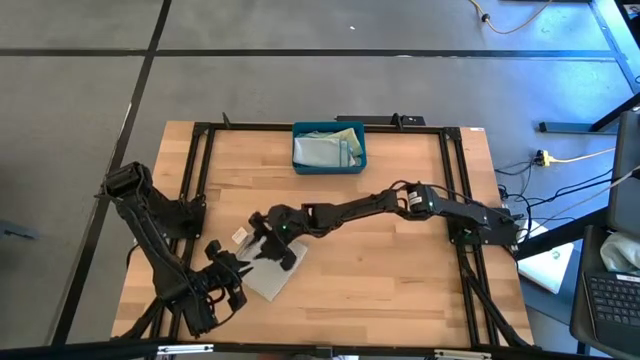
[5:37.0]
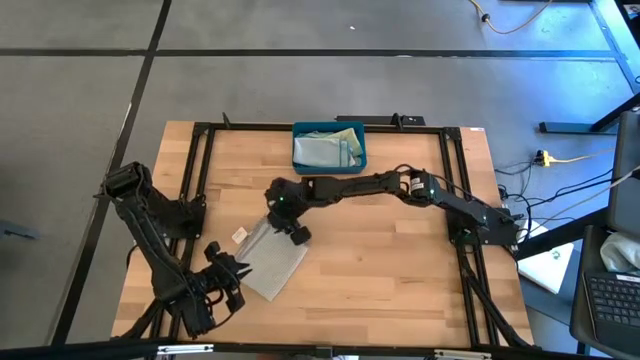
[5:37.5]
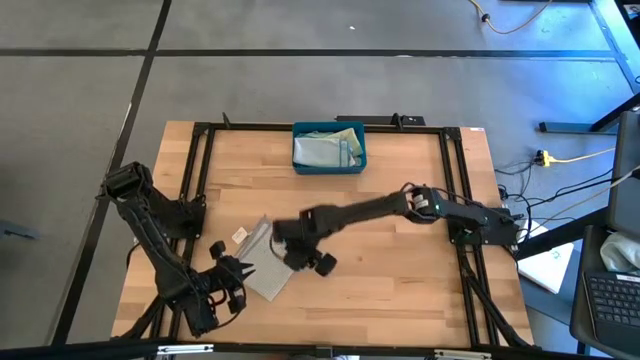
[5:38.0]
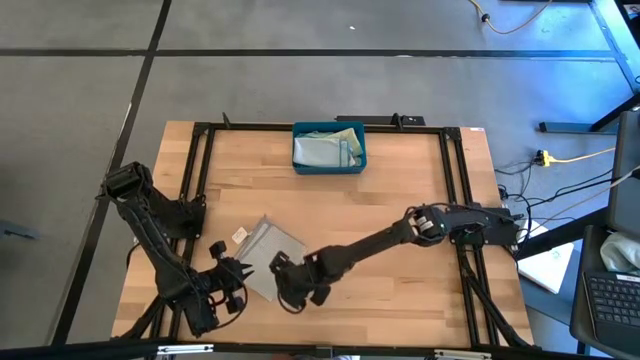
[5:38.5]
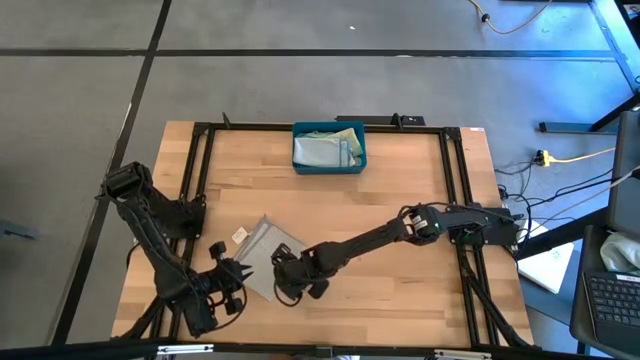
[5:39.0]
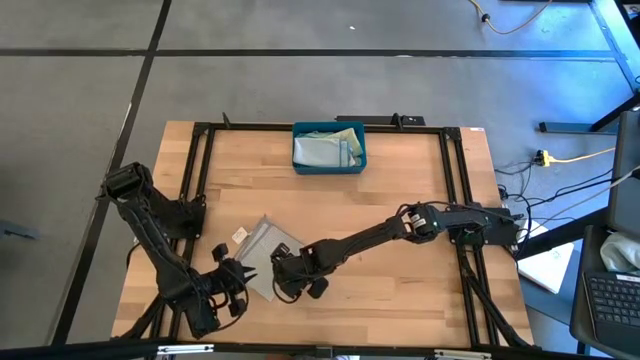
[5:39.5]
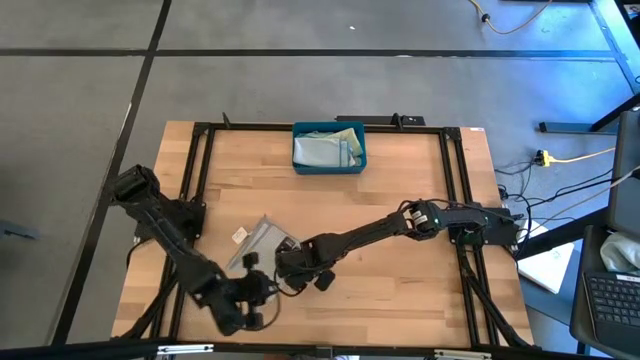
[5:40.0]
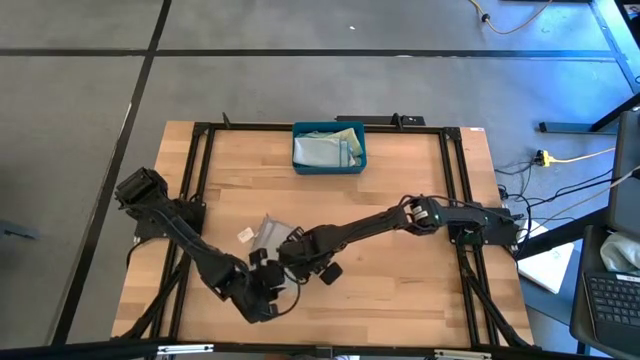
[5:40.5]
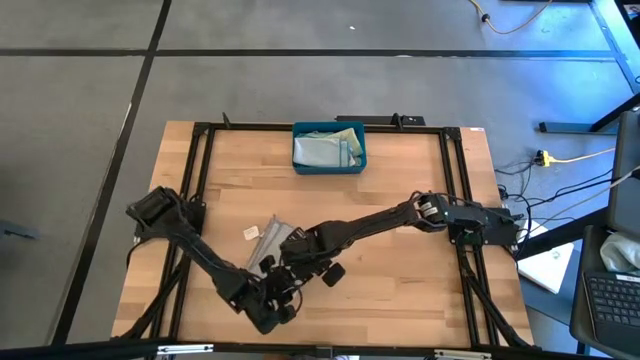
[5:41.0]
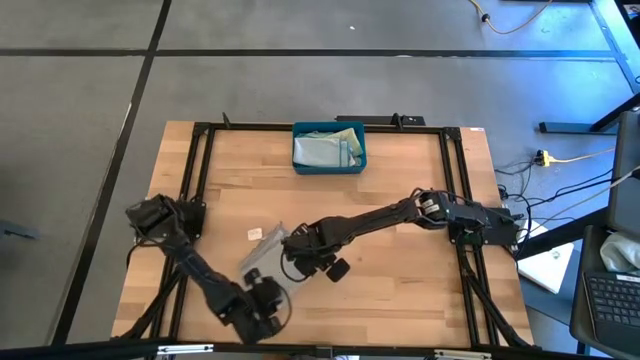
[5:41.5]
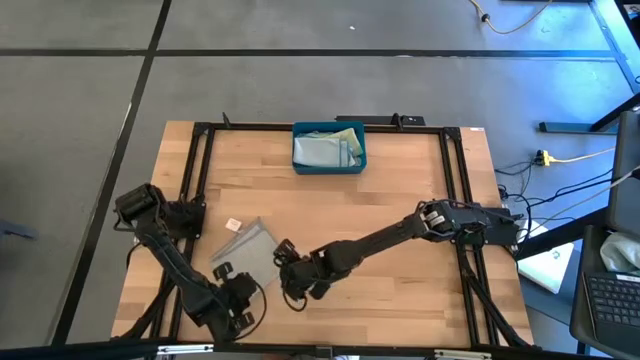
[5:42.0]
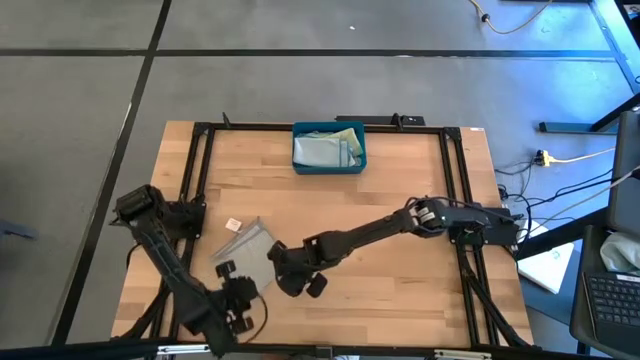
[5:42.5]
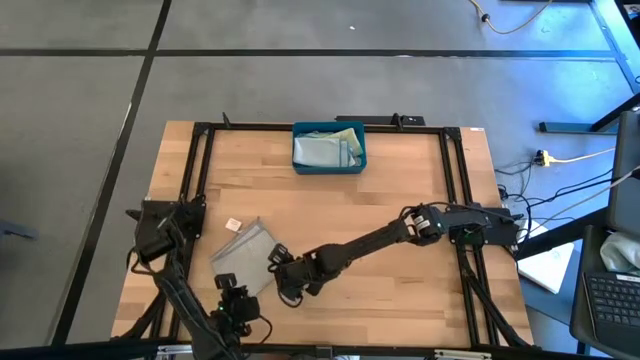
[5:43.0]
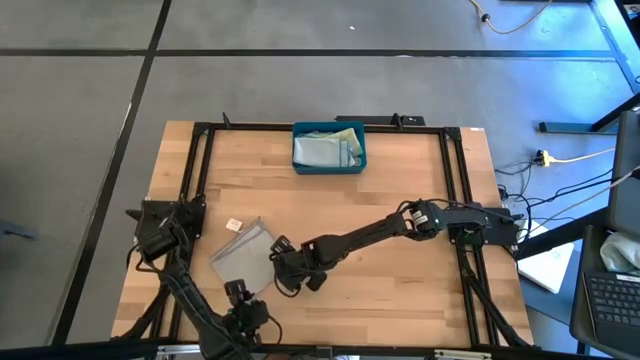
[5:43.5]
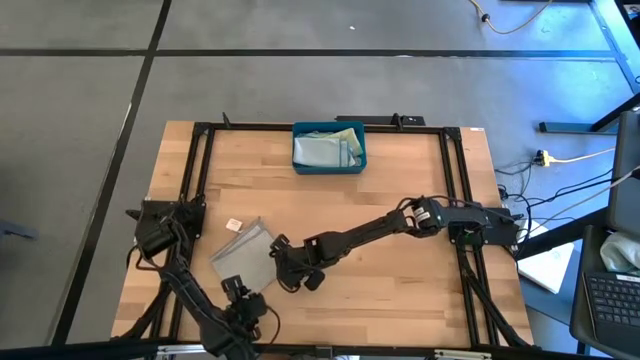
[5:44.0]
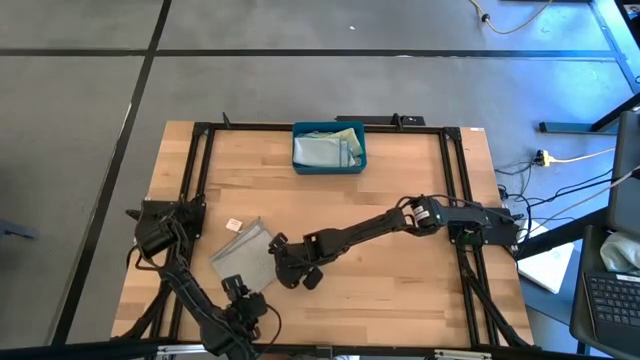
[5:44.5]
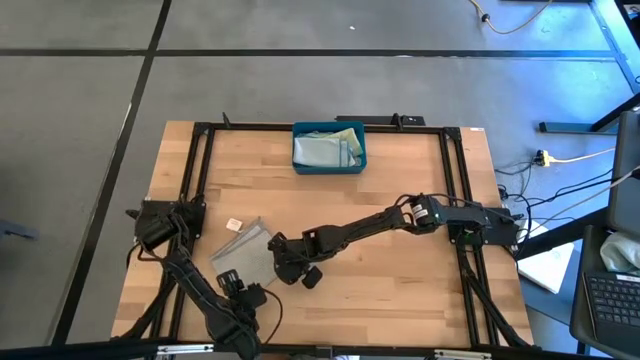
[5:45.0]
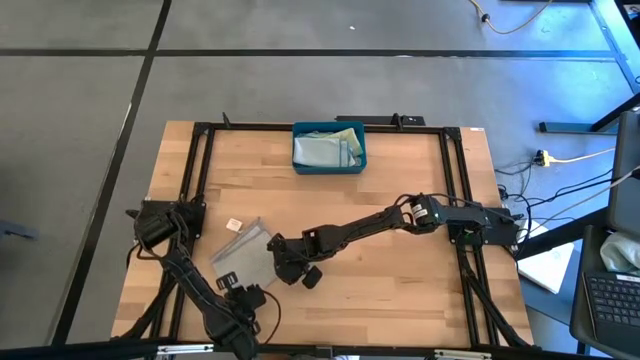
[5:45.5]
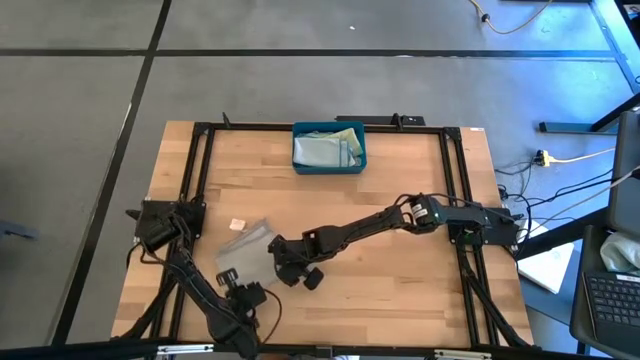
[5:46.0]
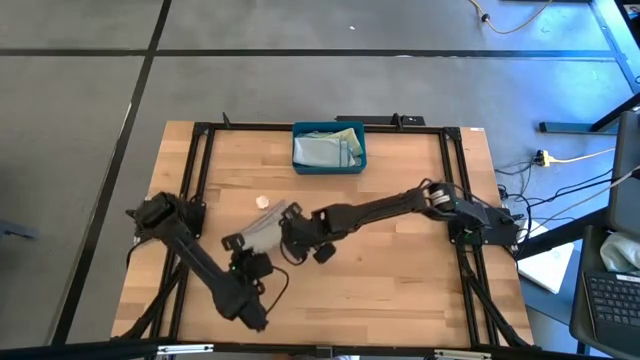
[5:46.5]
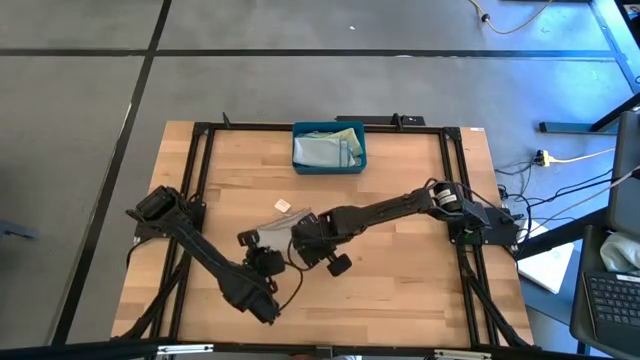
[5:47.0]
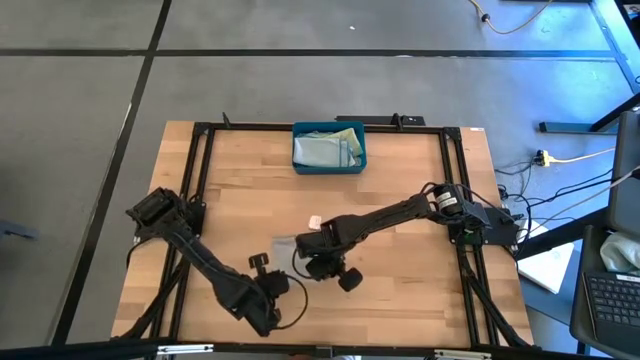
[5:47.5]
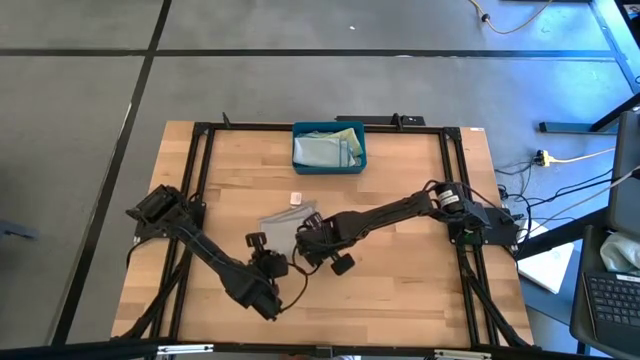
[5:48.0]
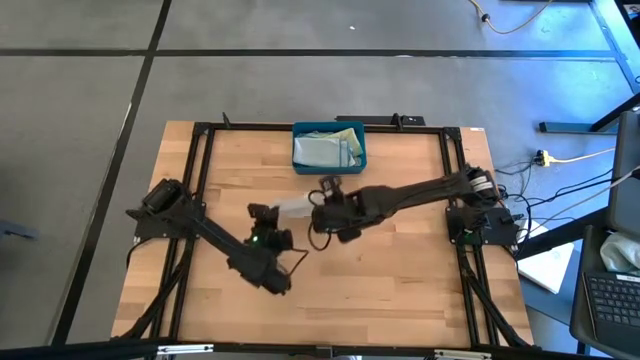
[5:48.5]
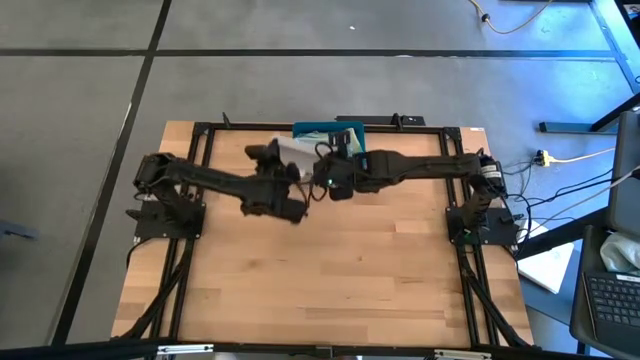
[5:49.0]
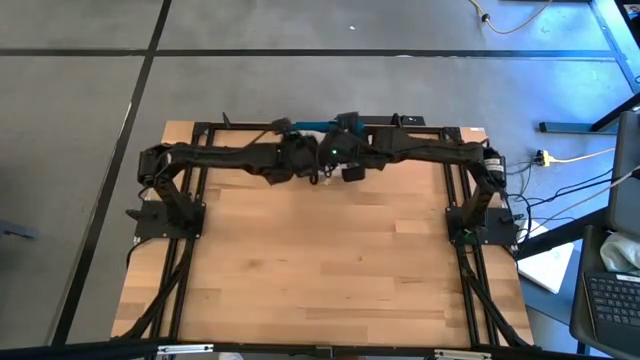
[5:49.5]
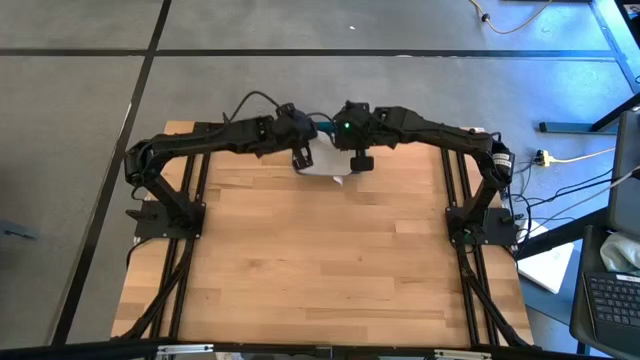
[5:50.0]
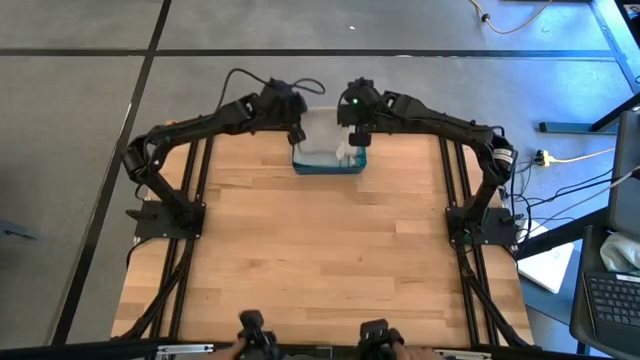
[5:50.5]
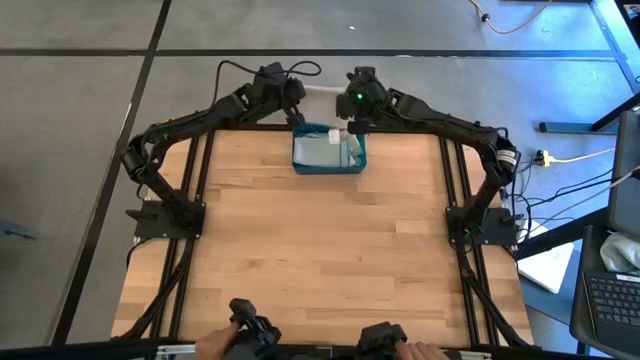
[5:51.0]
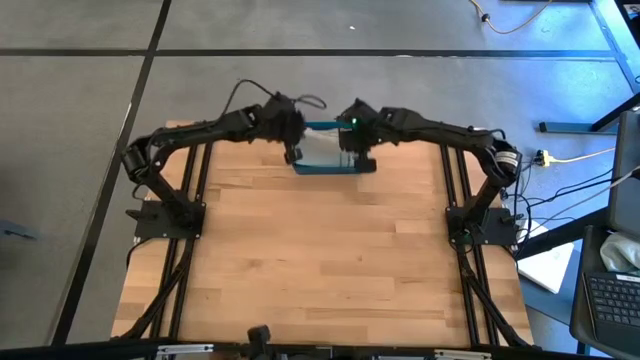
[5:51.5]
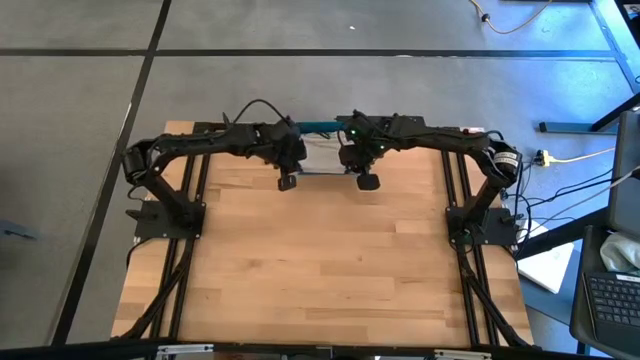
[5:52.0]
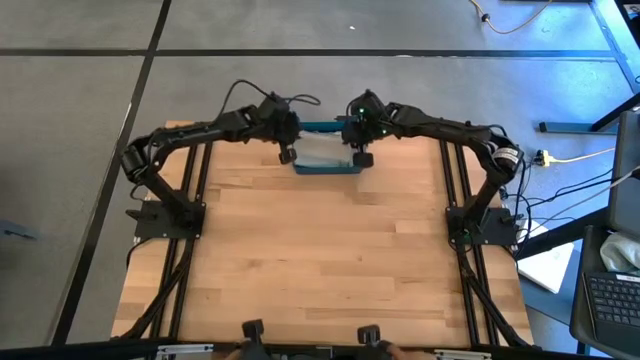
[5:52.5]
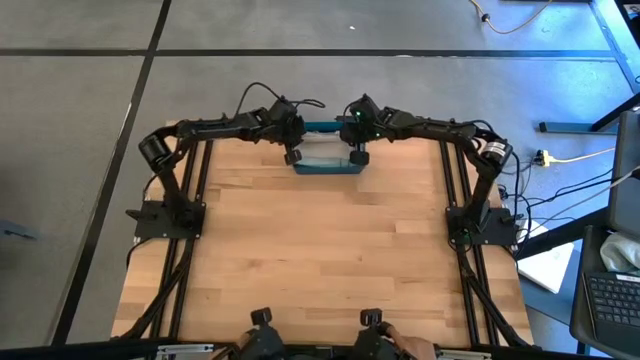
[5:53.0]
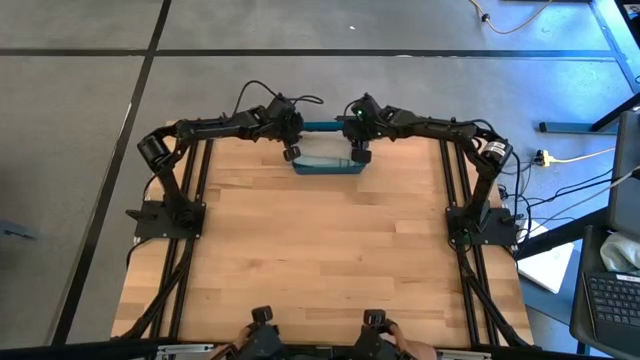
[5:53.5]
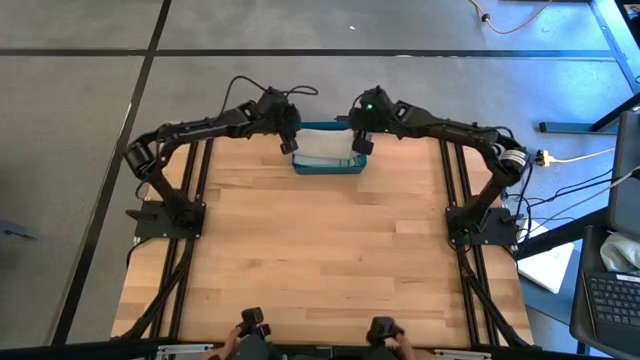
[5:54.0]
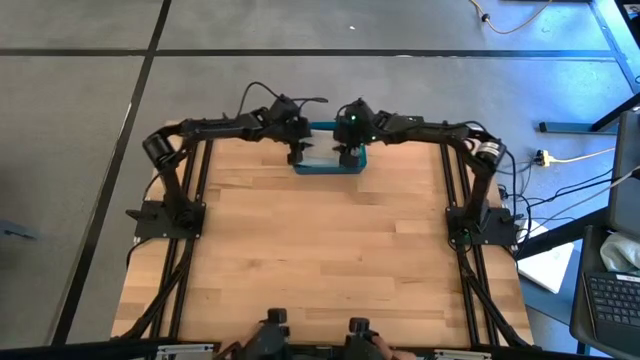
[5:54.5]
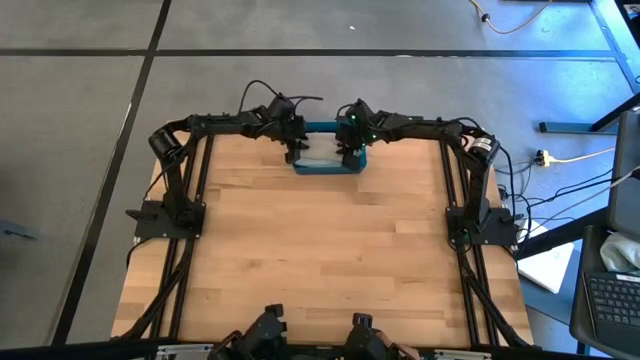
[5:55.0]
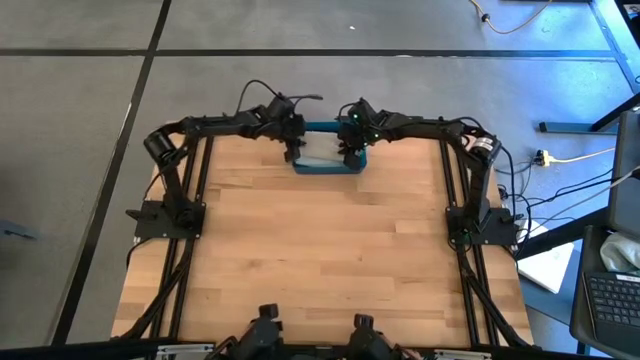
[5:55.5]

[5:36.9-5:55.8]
Task: Fold microfiber towels
Put the folded gray towel into the blue bin

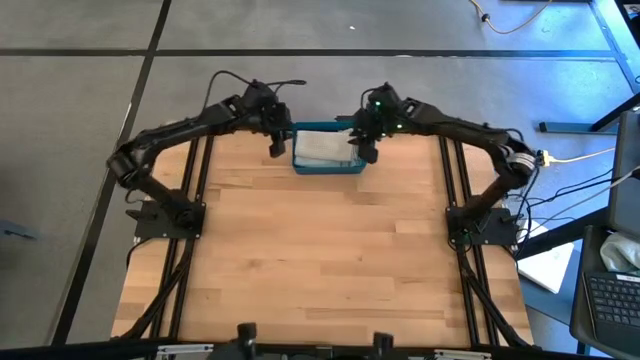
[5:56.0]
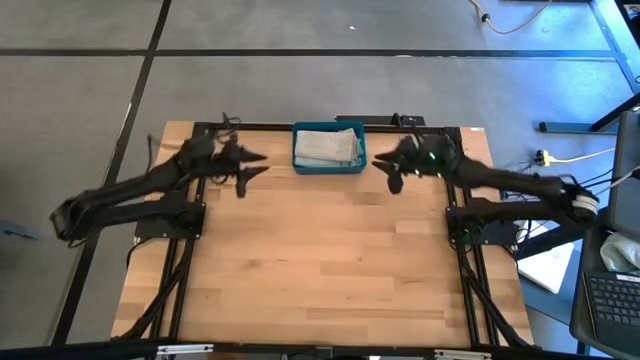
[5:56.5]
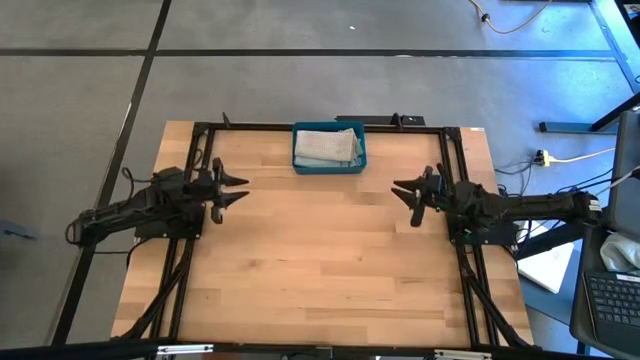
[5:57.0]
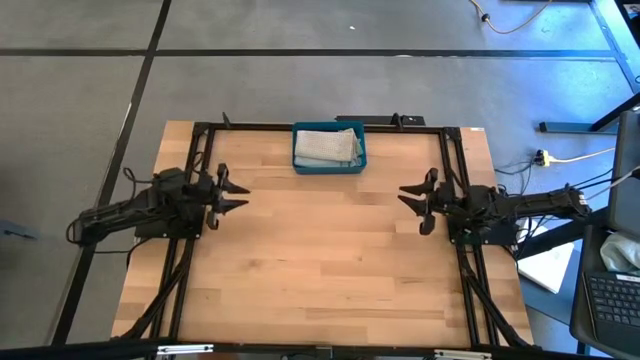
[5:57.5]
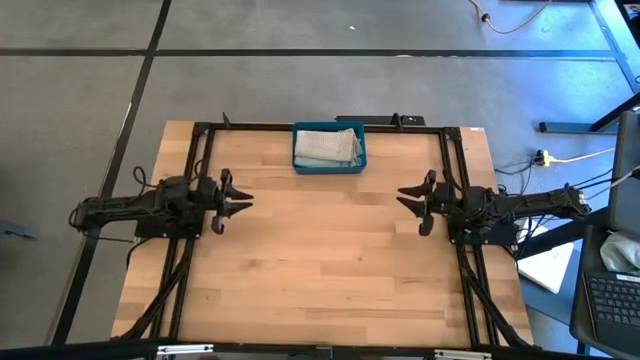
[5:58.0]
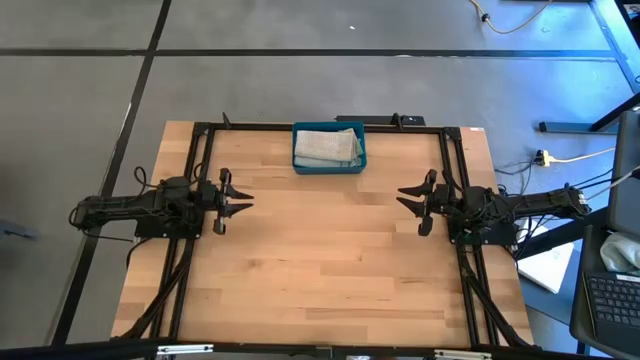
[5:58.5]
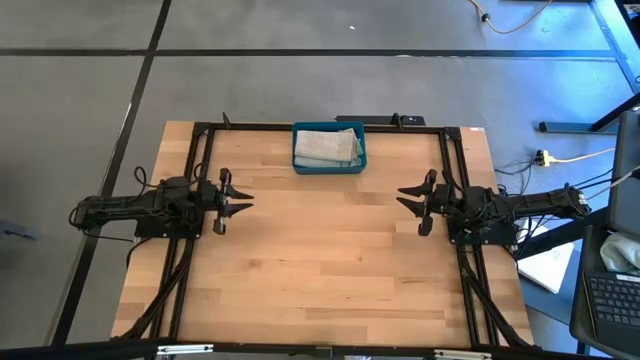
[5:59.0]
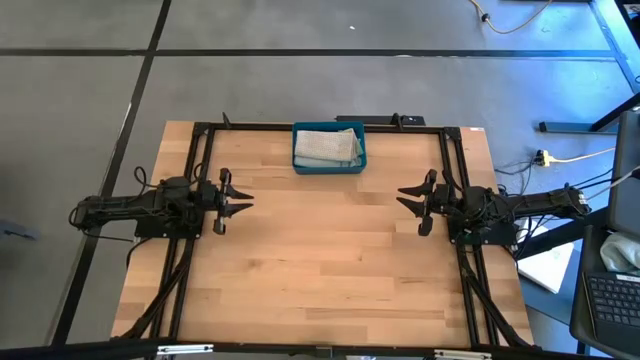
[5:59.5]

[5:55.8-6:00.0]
Return to Home Position
